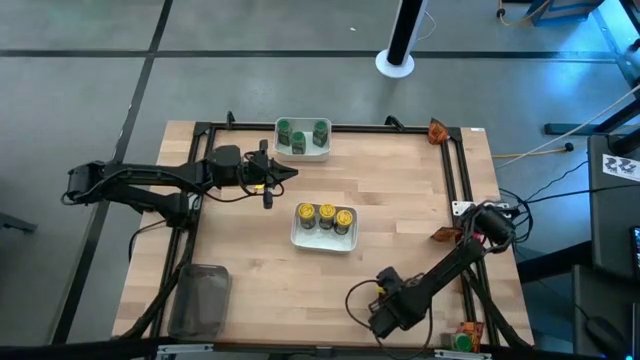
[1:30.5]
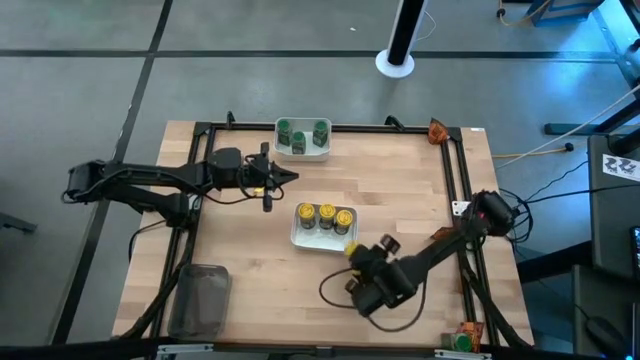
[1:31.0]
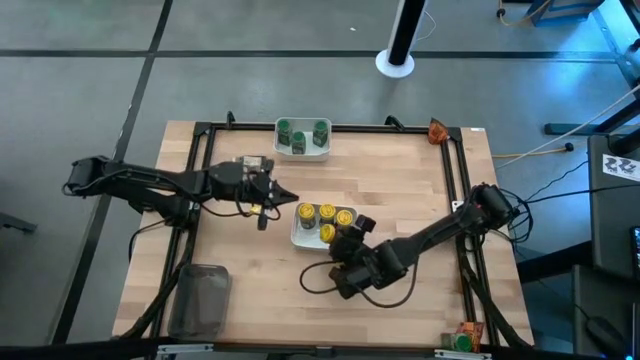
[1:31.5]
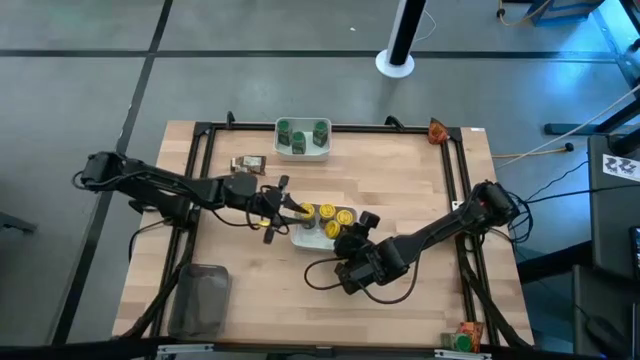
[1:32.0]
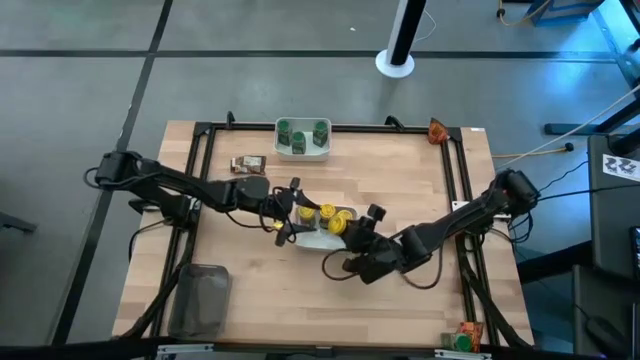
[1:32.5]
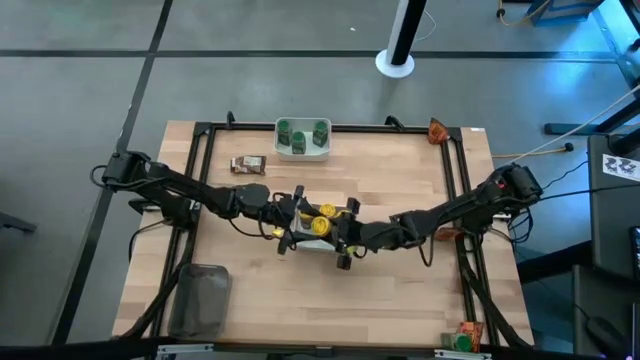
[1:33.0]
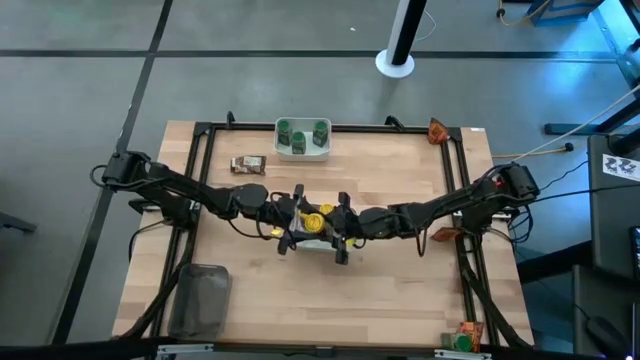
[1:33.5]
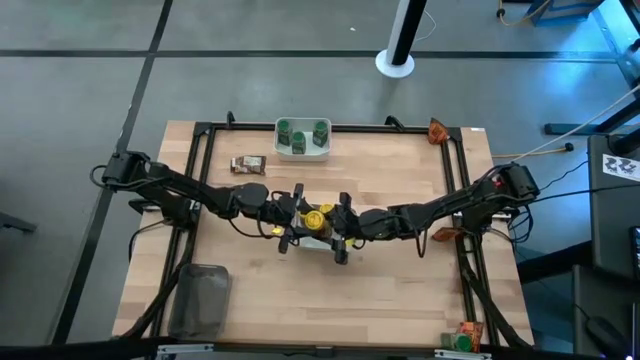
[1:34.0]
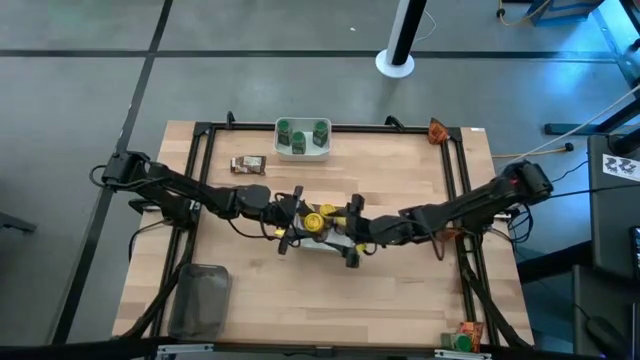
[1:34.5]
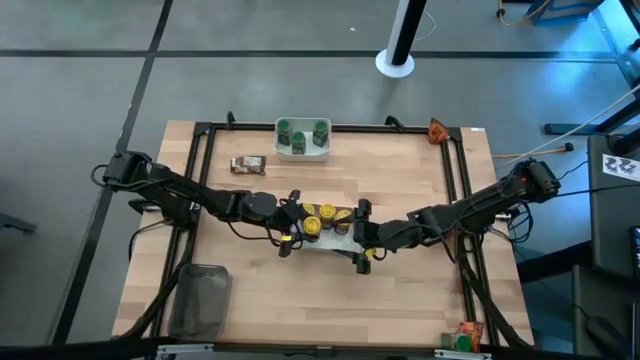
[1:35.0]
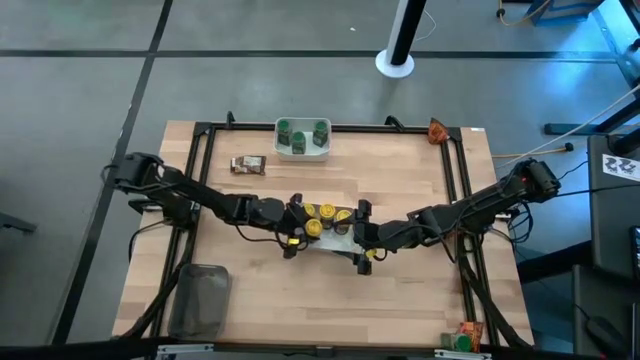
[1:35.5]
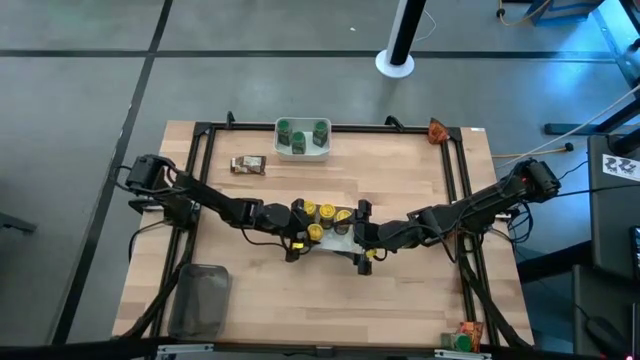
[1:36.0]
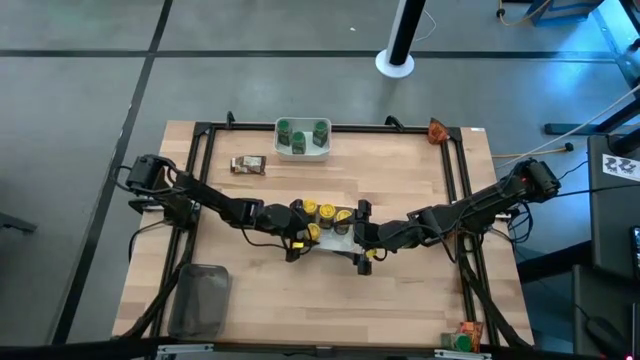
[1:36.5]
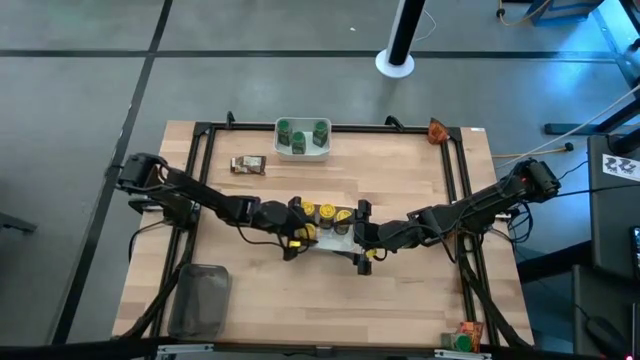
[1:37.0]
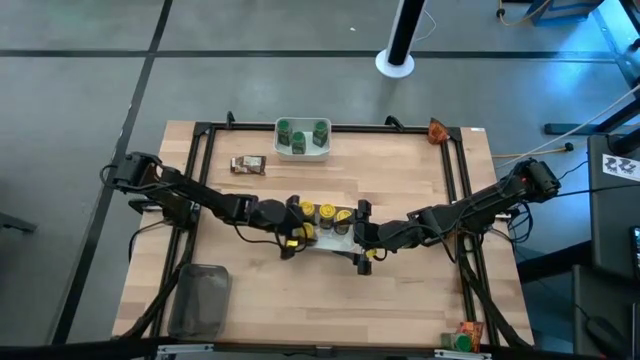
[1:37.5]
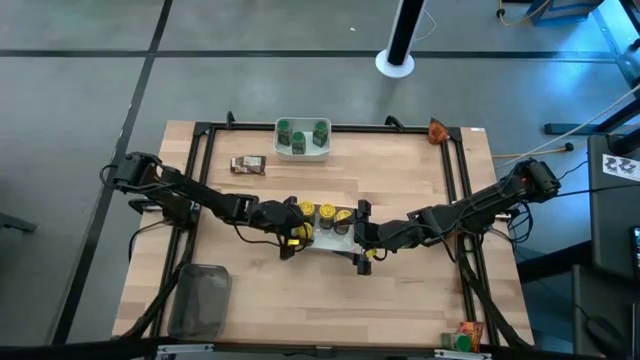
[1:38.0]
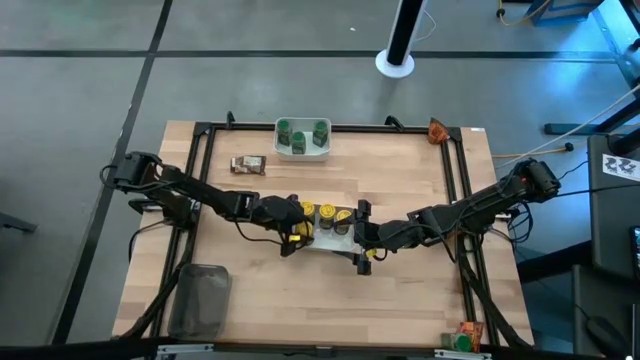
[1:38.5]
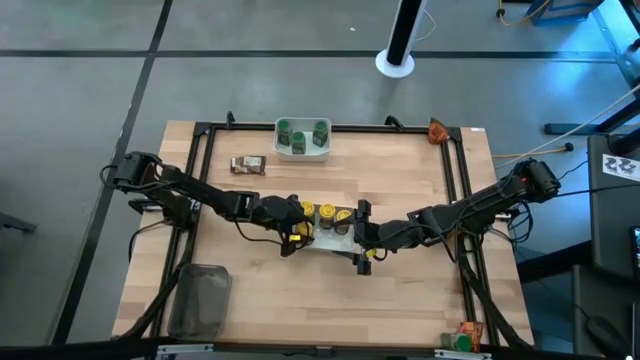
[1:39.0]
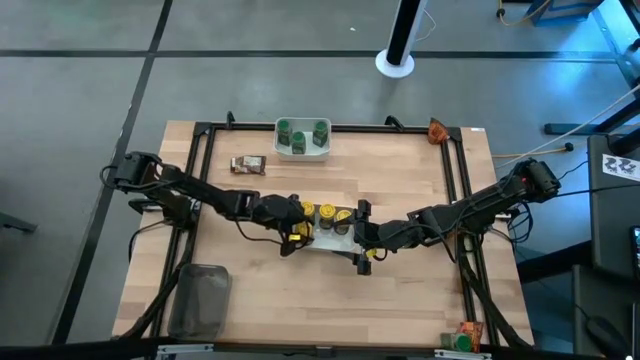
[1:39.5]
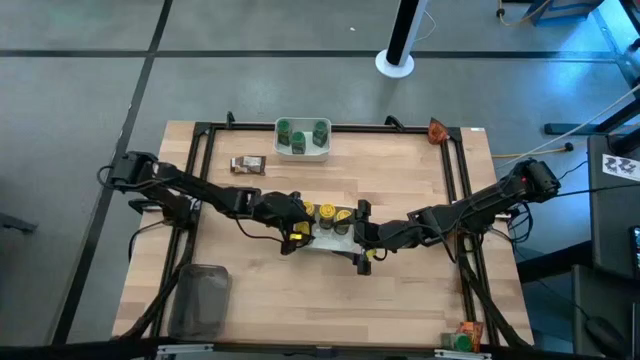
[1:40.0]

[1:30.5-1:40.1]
Task: Sort spices by type
Put the yellow seasoning bottle into the bottom white bin

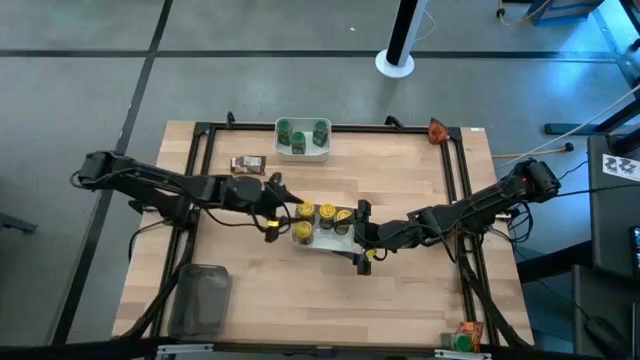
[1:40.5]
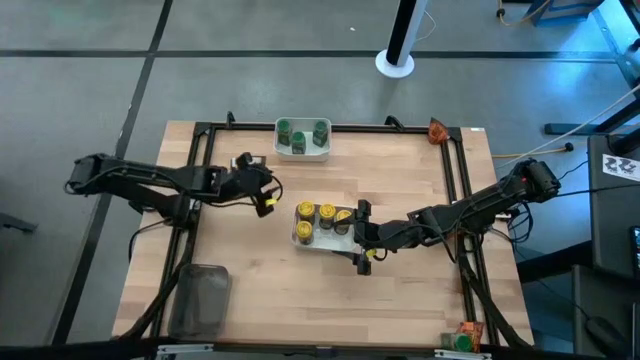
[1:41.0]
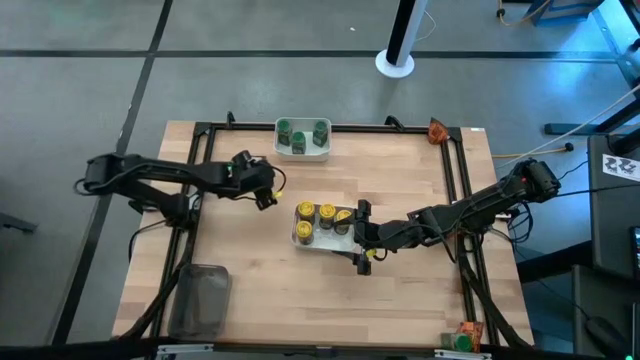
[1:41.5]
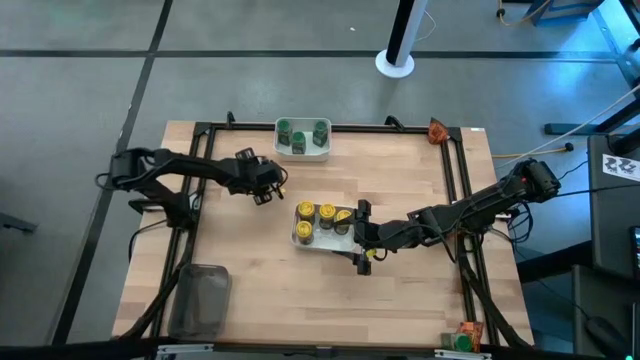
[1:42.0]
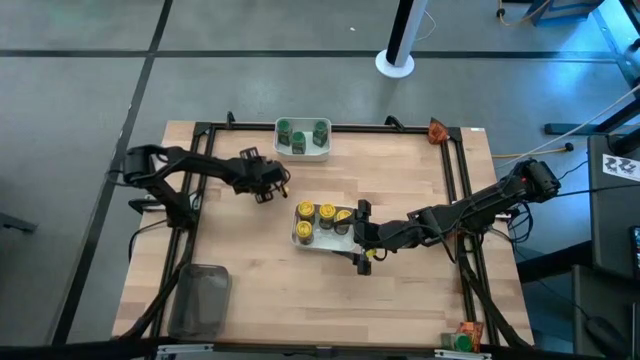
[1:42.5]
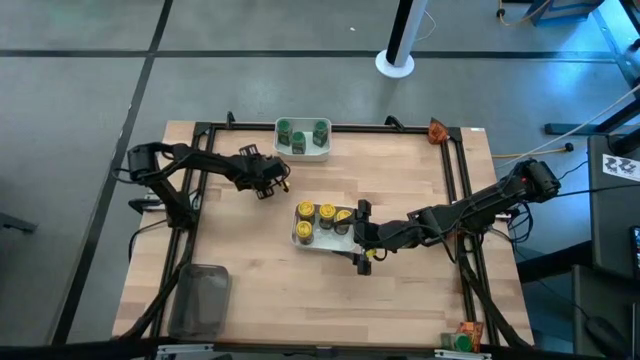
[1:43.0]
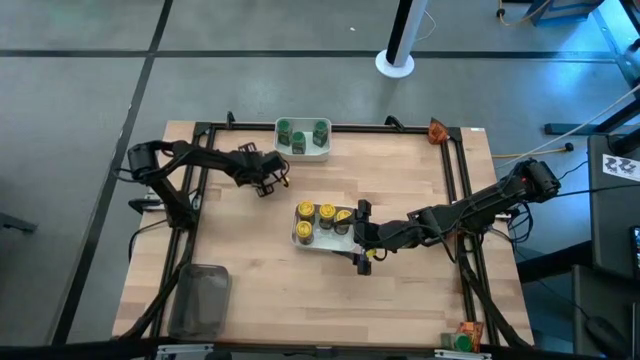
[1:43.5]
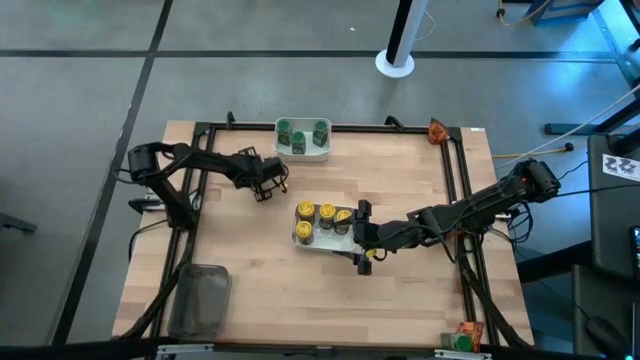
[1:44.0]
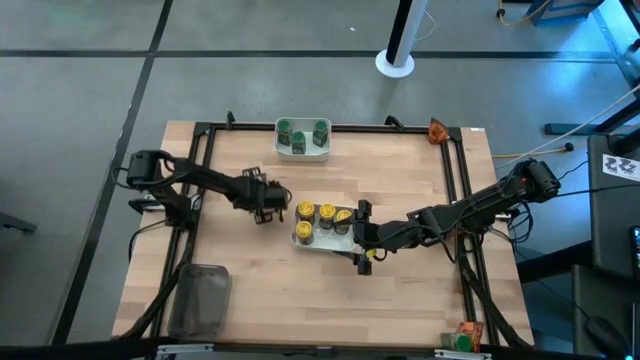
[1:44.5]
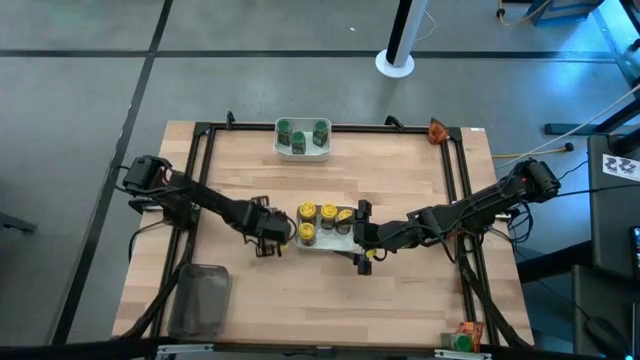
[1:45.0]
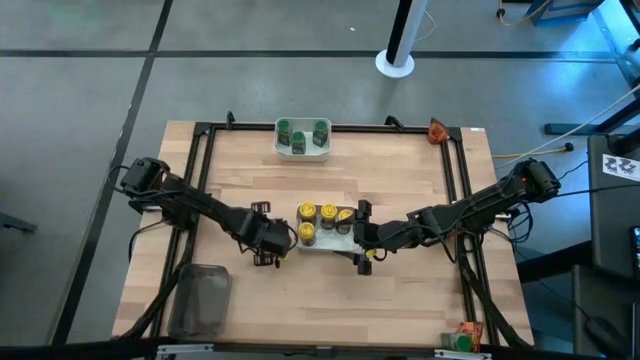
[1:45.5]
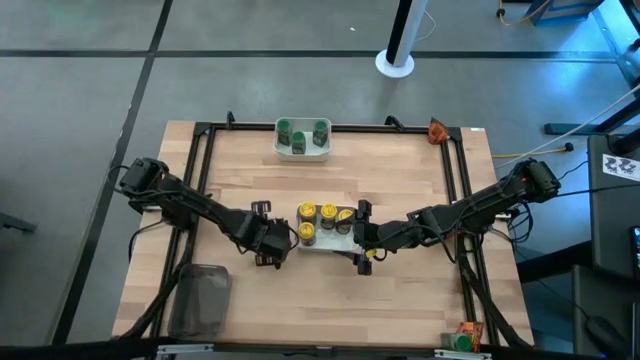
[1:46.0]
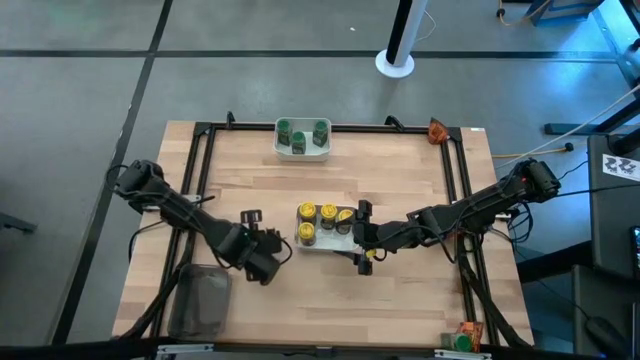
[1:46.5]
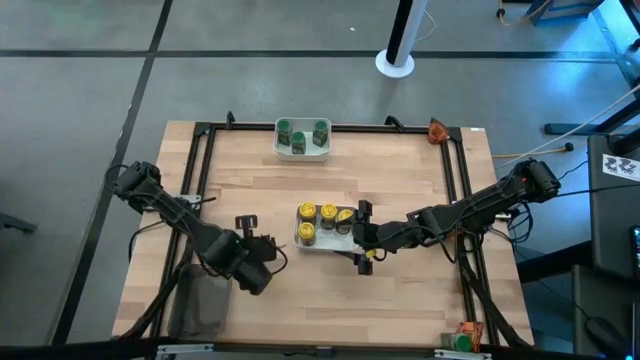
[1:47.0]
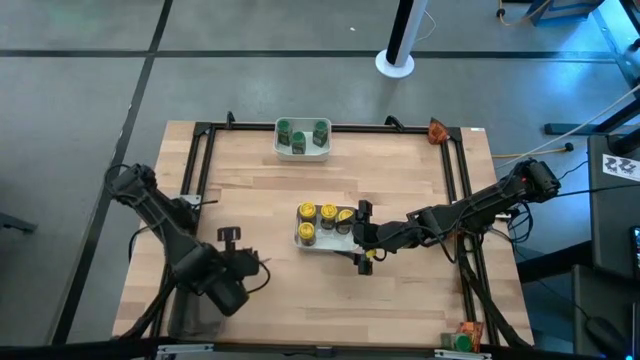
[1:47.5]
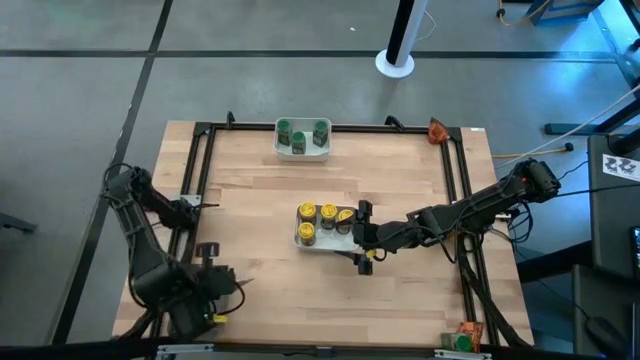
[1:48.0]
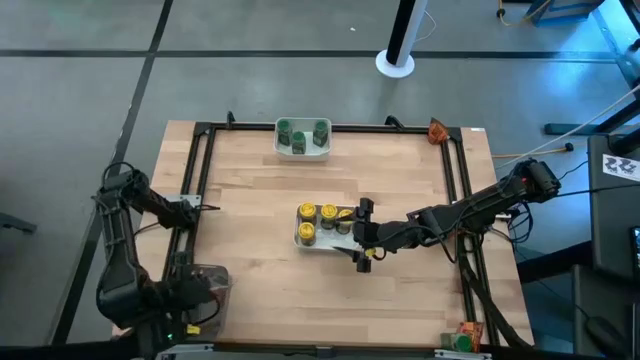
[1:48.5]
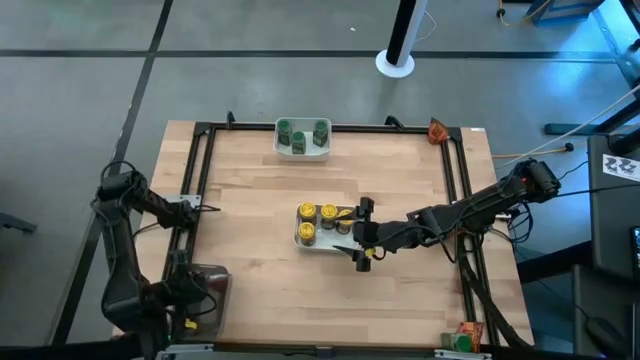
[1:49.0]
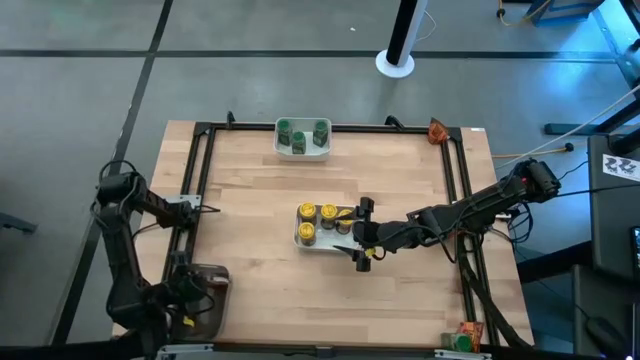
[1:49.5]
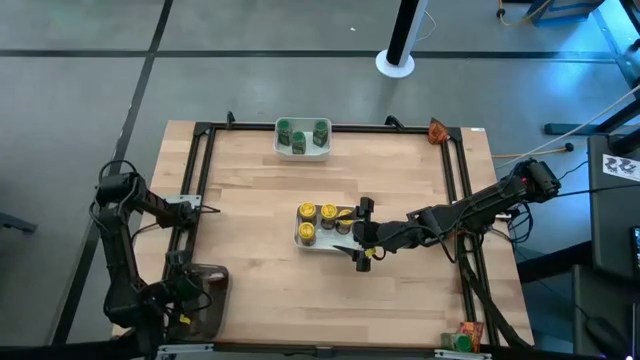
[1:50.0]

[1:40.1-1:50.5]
Put the top left orange seasoning pack into the black bin
